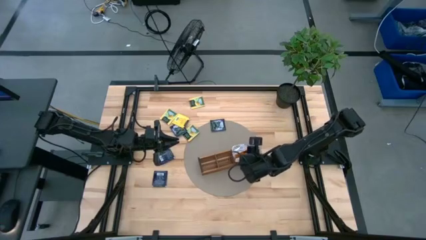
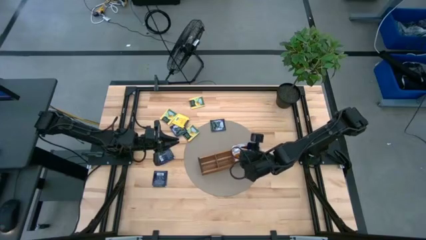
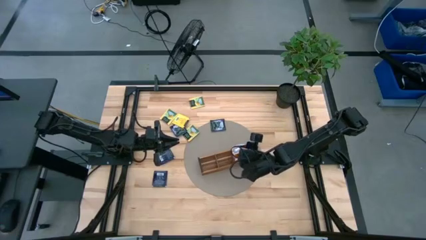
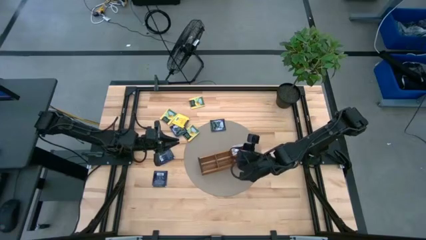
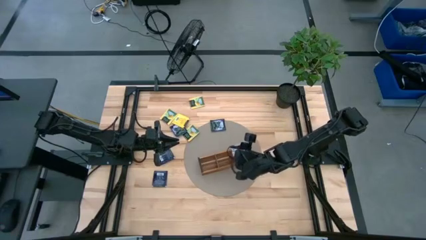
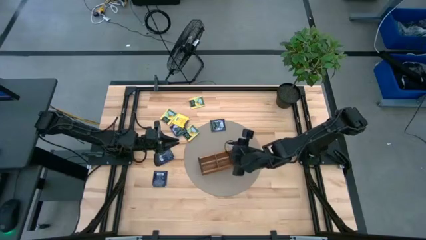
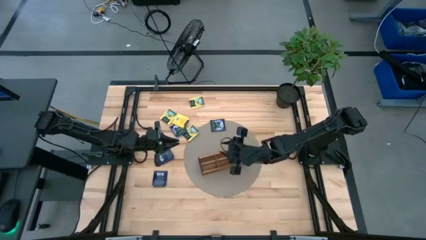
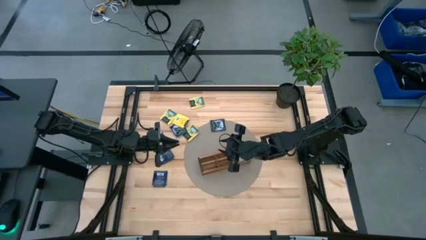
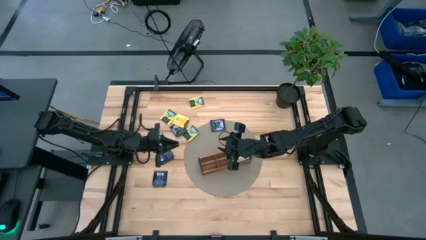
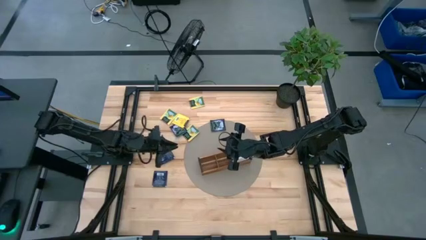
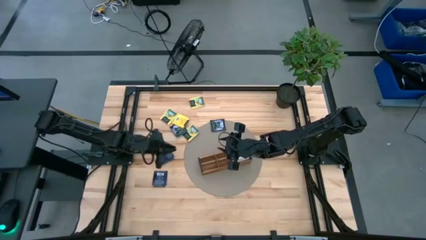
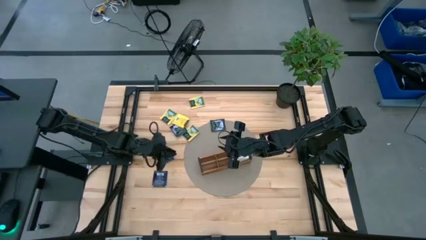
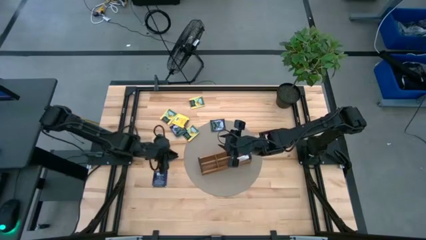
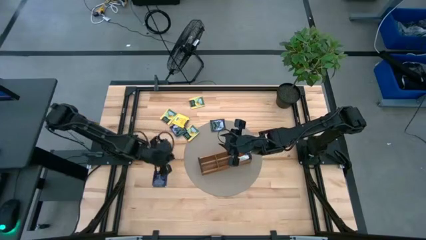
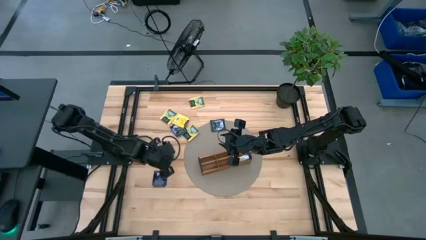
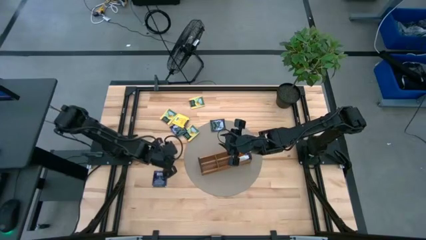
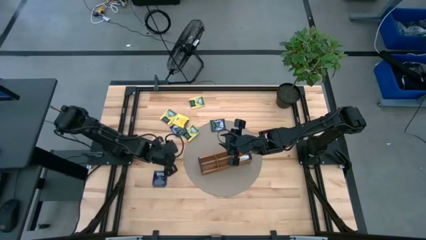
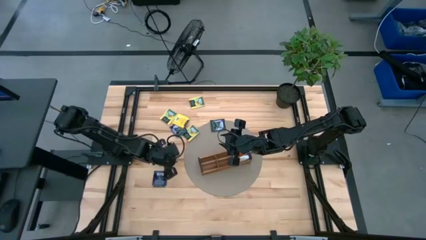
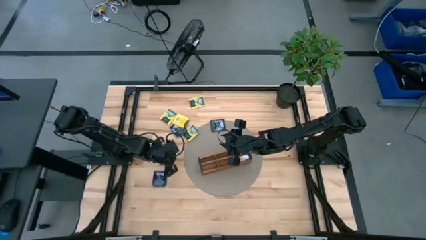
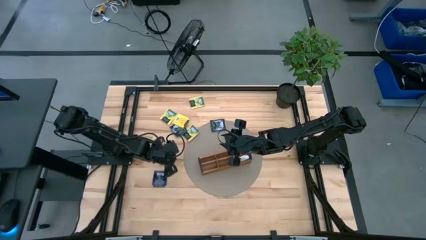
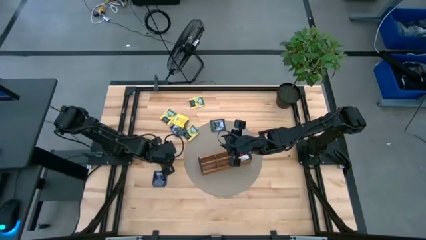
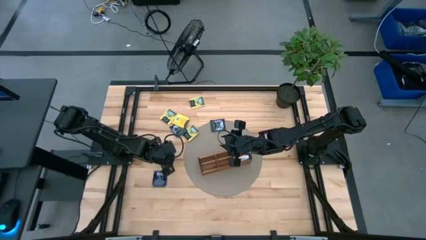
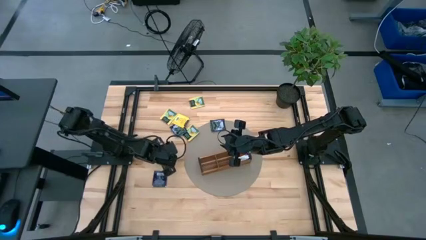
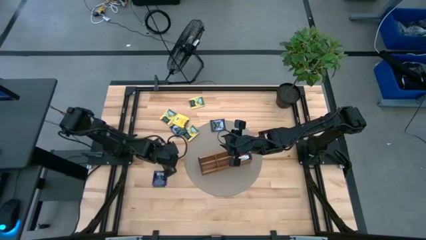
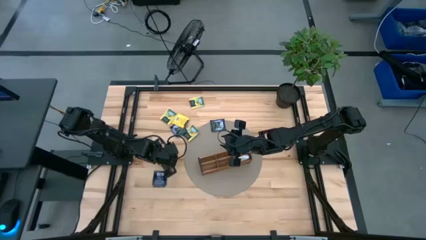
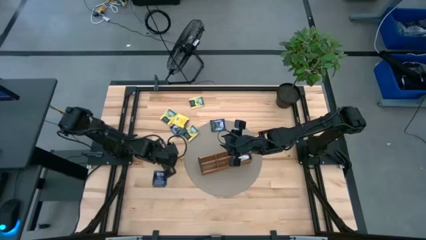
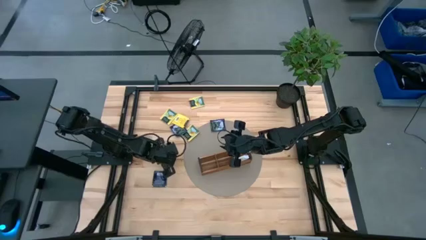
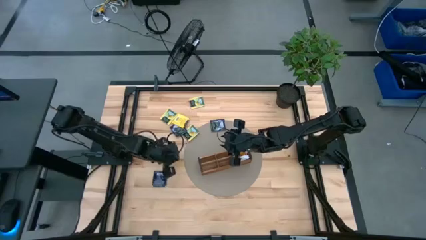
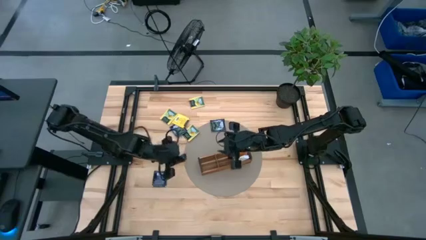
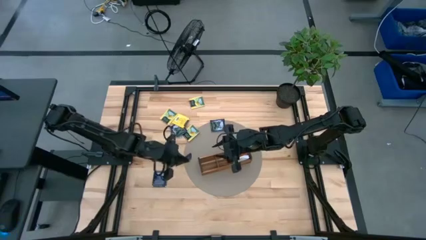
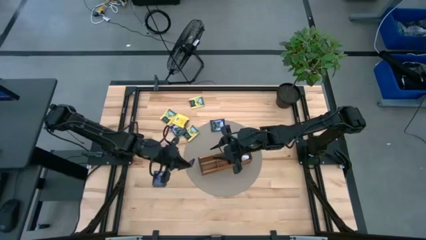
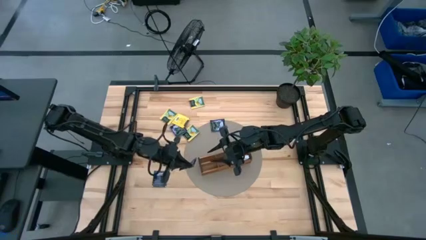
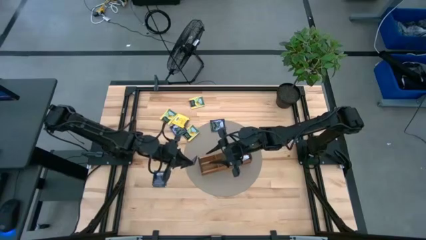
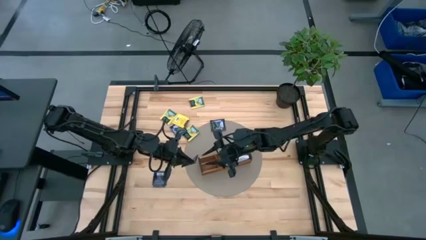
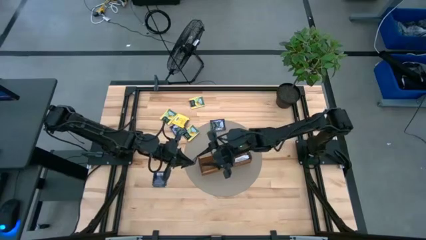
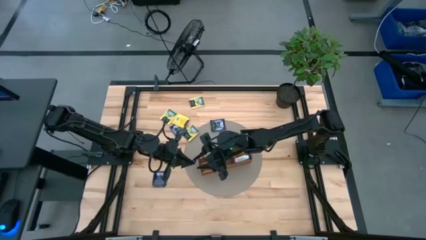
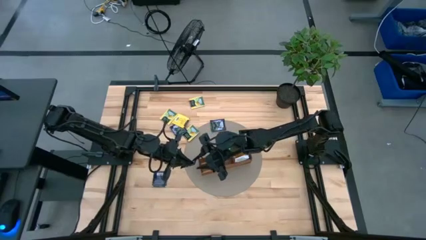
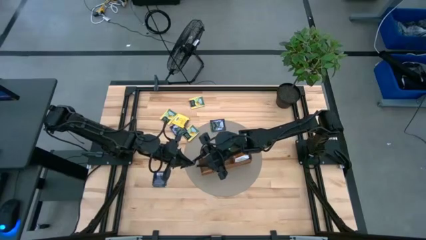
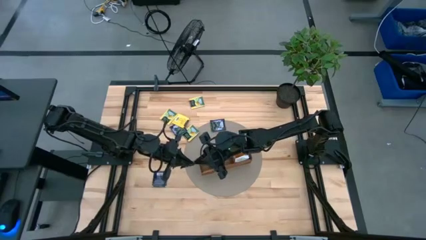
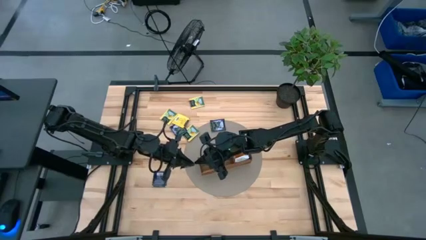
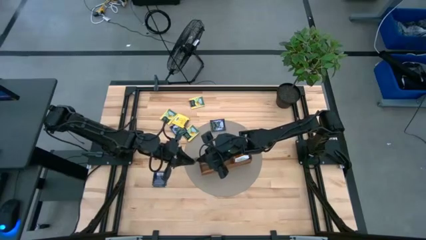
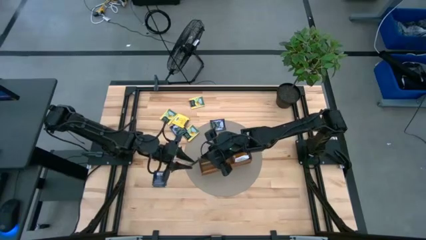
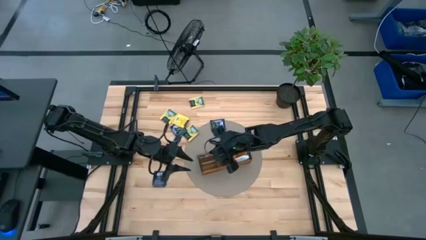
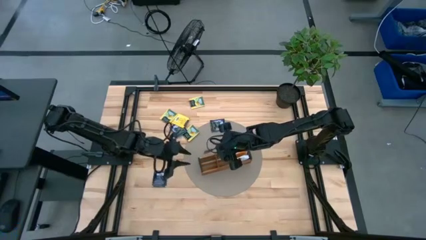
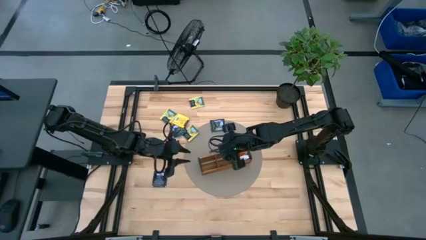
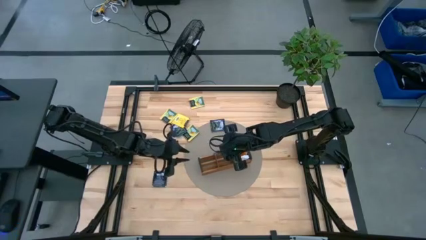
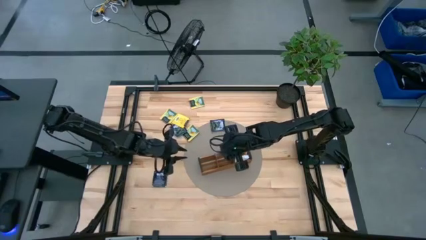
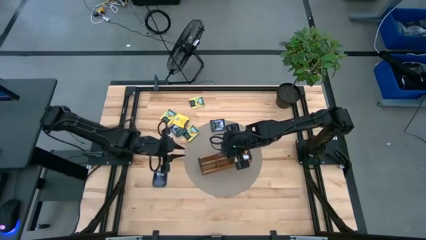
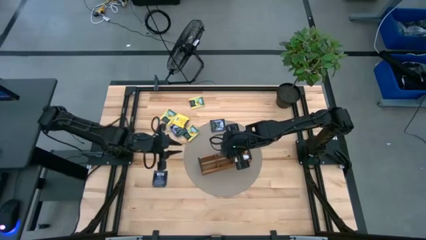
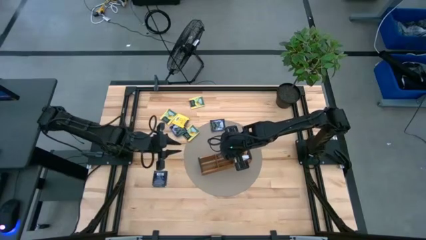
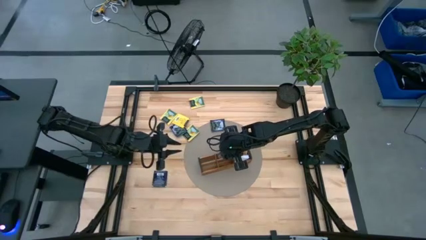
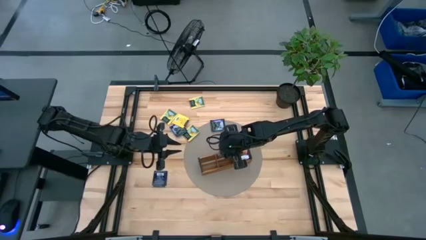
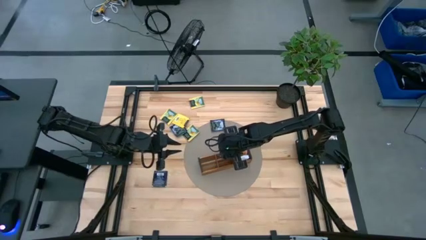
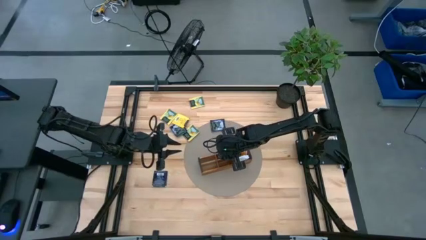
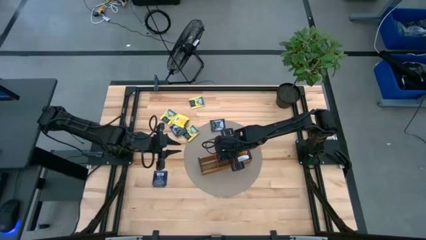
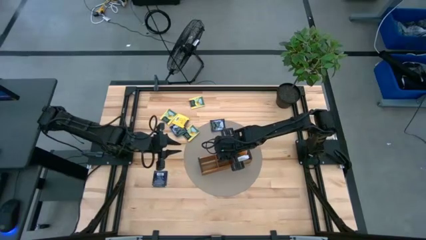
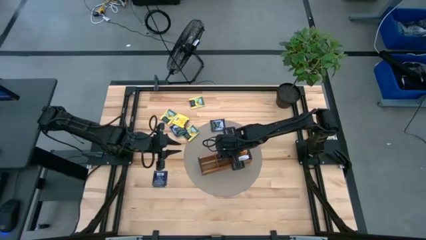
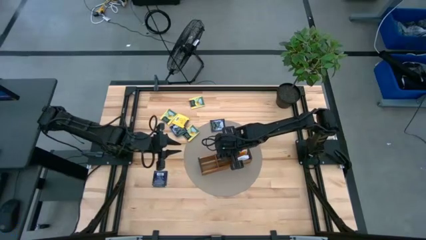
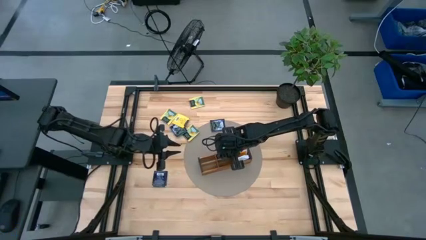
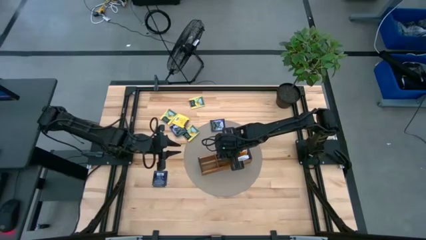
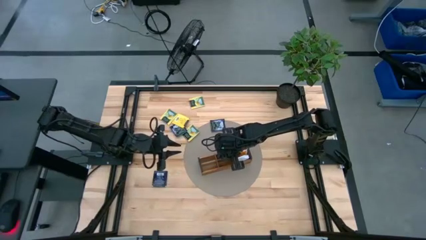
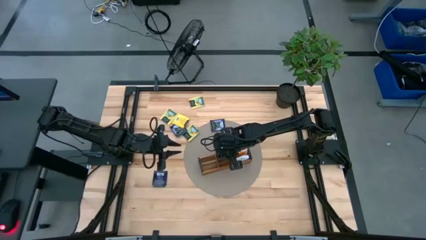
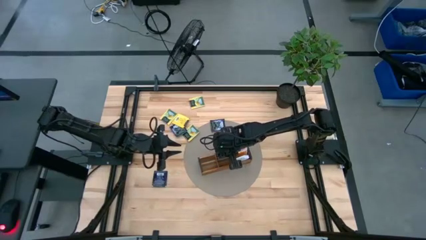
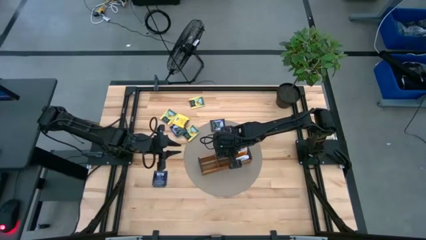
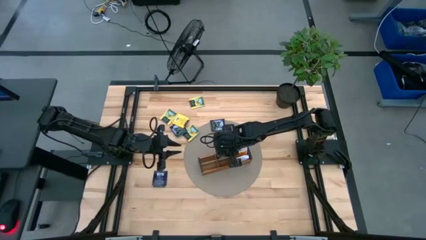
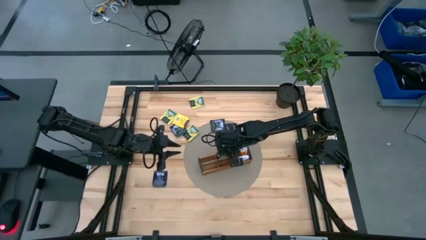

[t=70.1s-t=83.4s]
Task: Pick & Place Tea
Put the purple tea bag into the middle section of the wooden organizer

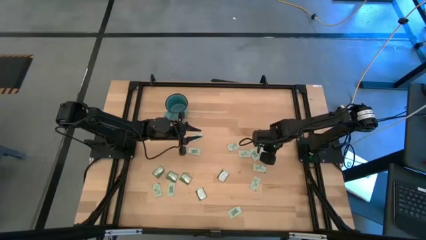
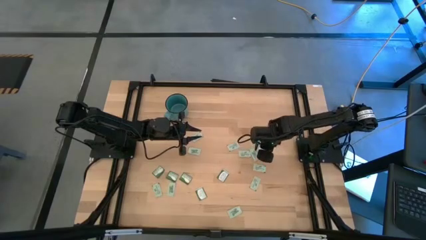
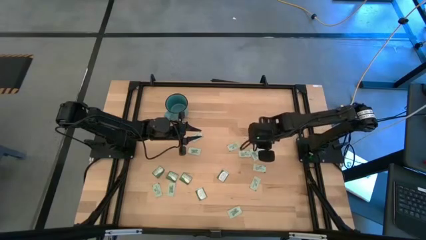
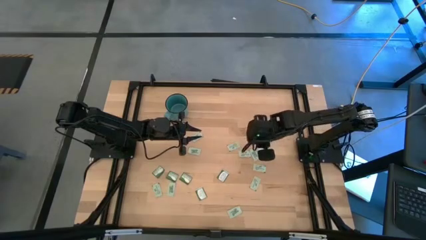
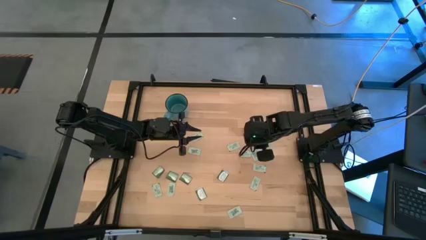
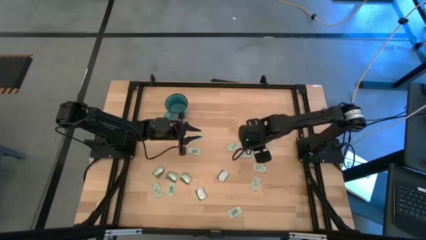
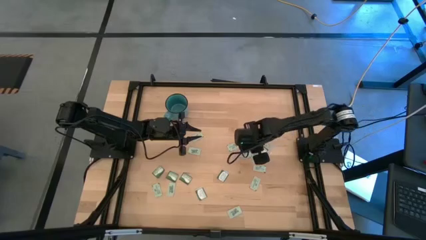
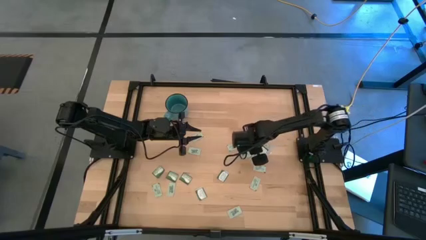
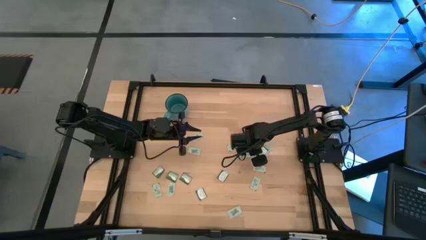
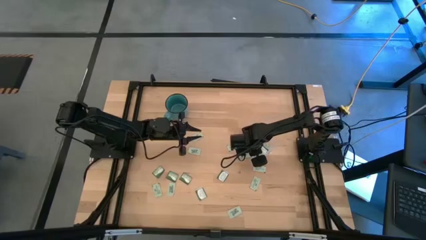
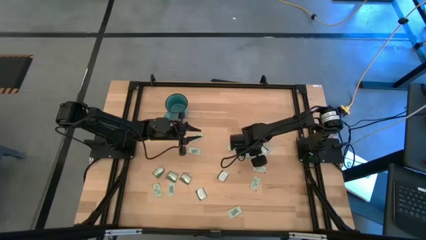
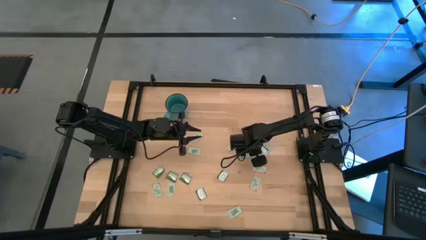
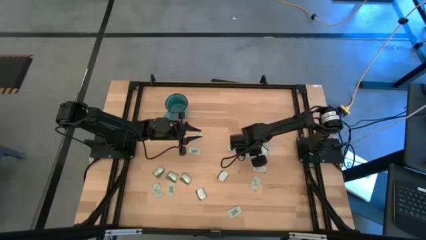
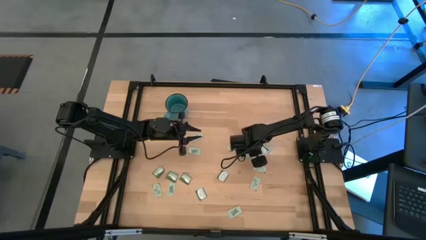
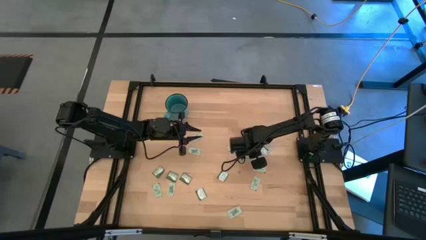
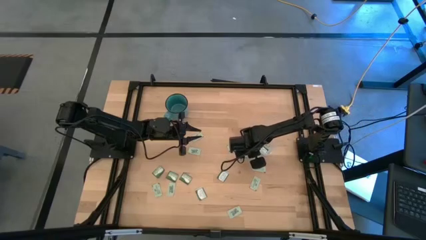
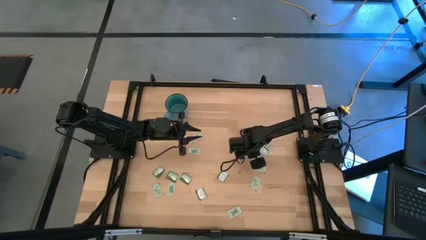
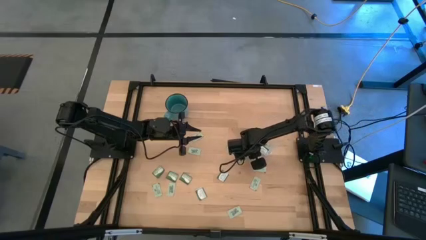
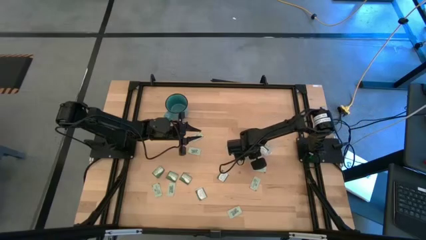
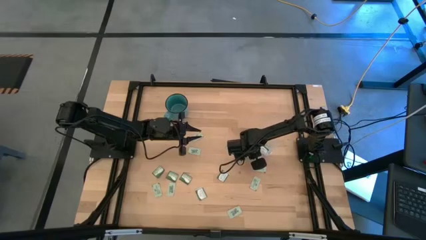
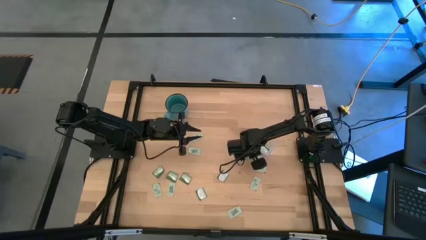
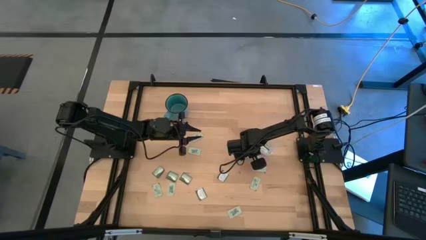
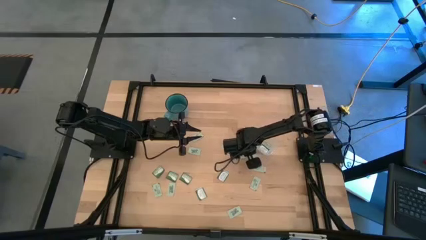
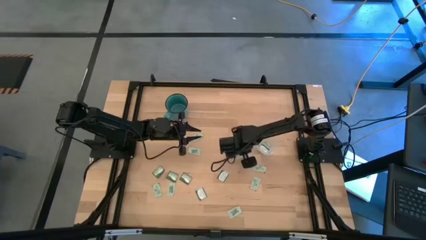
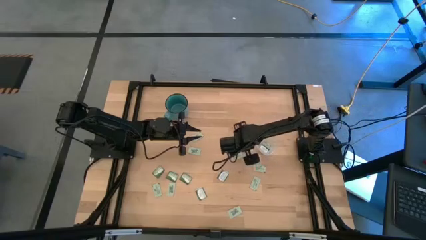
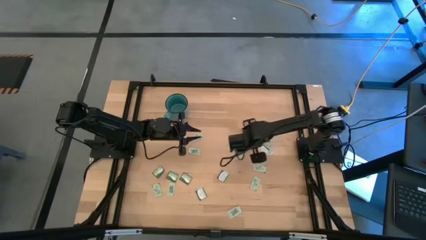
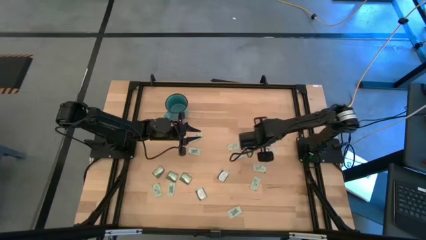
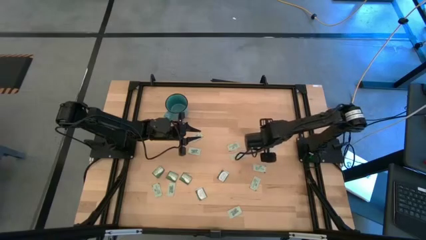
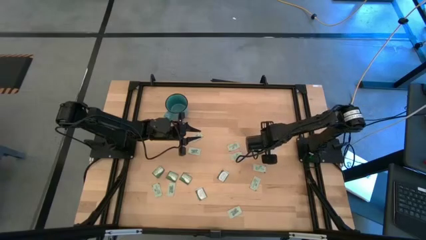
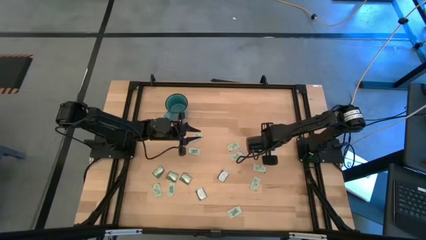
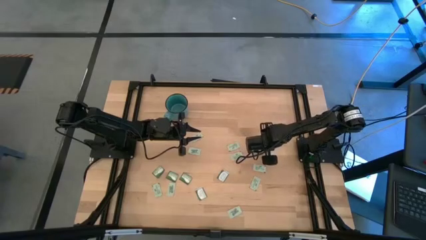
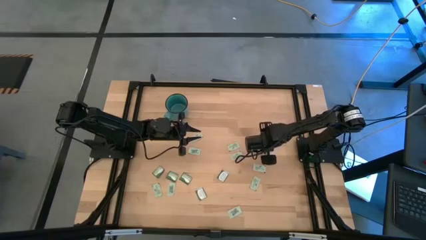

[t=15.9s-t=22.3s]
Task: Pick and place Stevia / Truvia into bins
Put the stevia packet into the transparent bin
